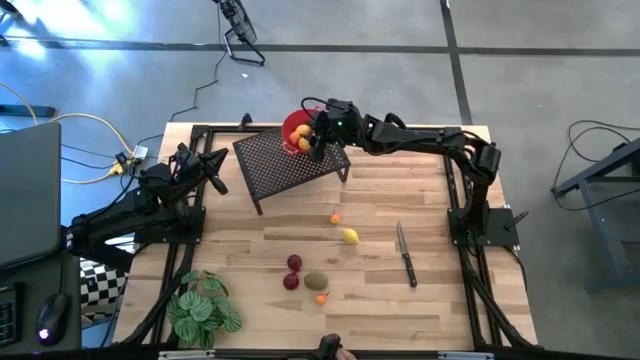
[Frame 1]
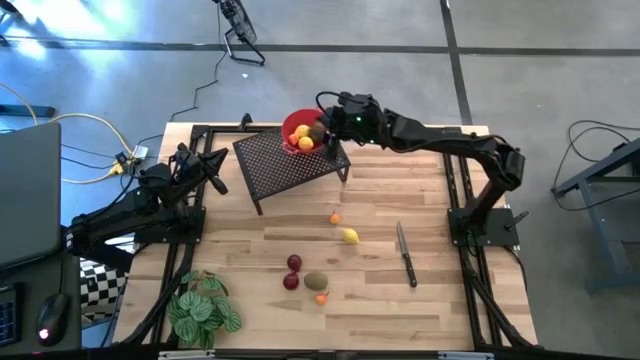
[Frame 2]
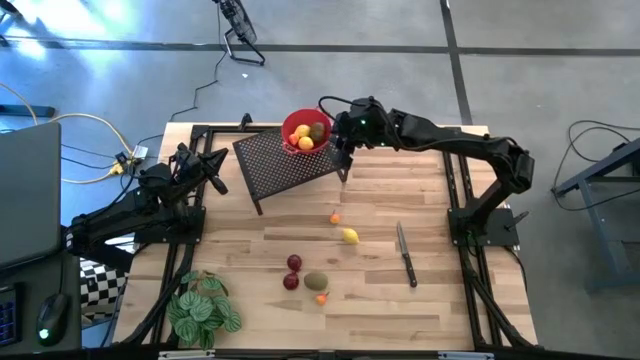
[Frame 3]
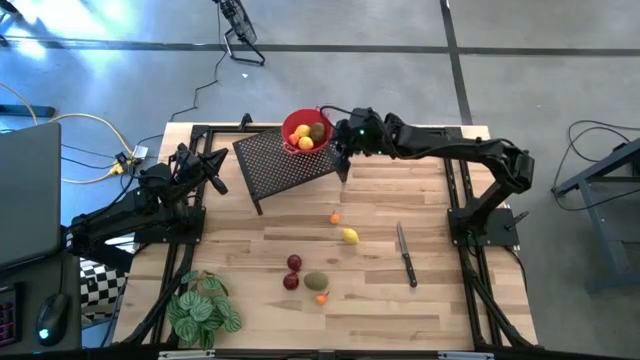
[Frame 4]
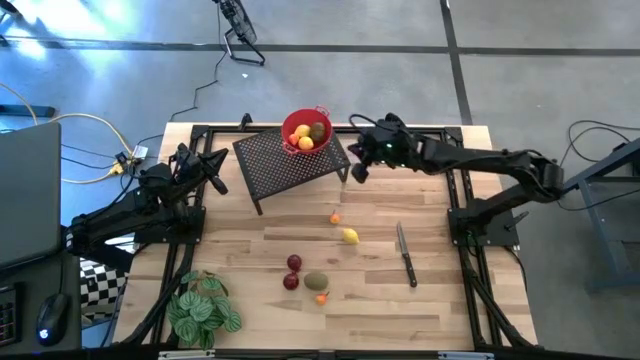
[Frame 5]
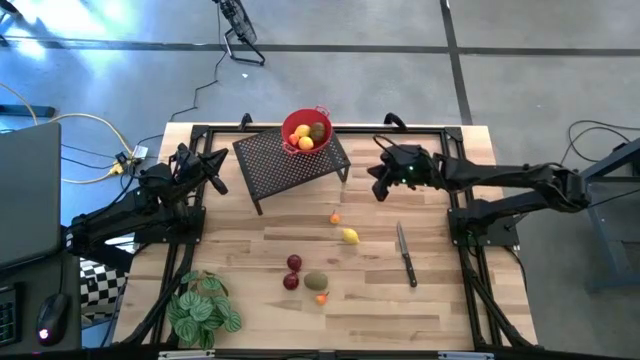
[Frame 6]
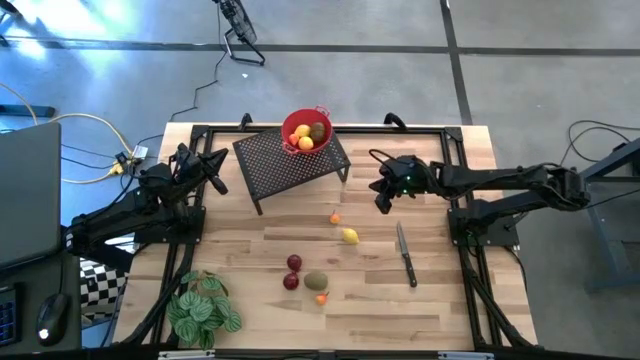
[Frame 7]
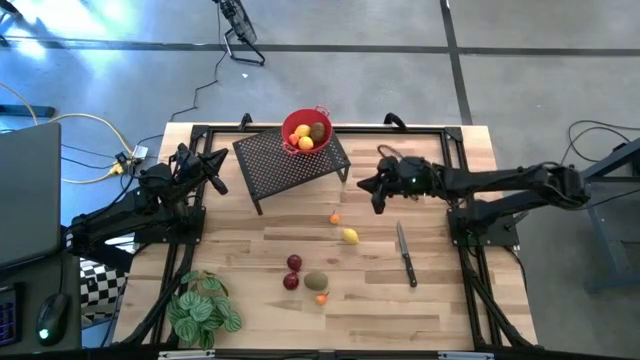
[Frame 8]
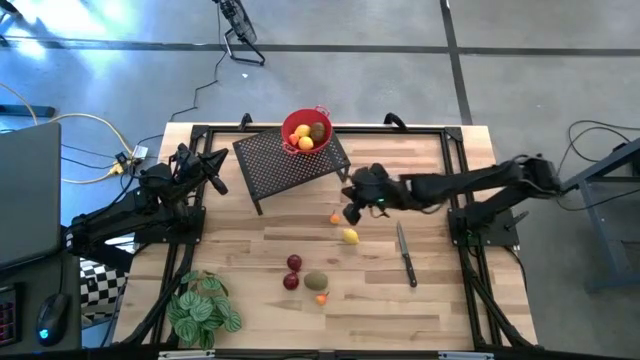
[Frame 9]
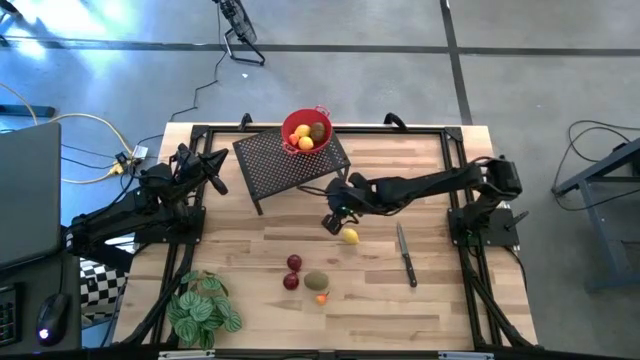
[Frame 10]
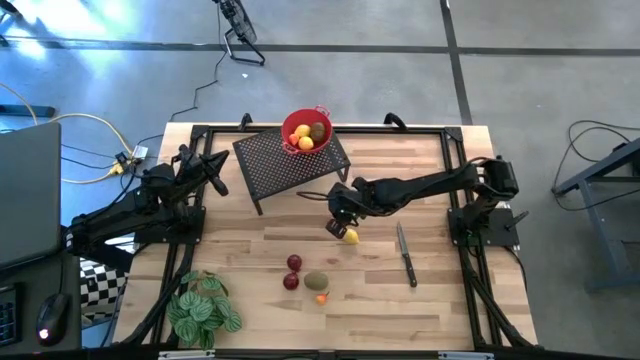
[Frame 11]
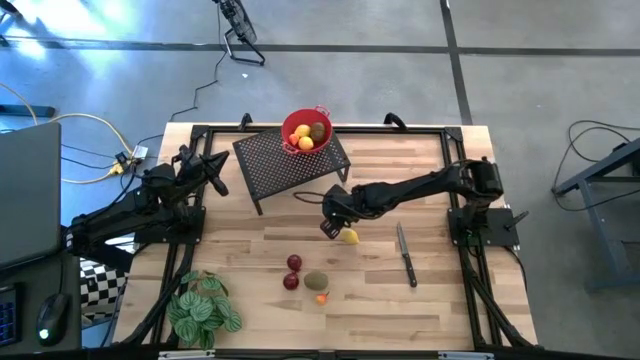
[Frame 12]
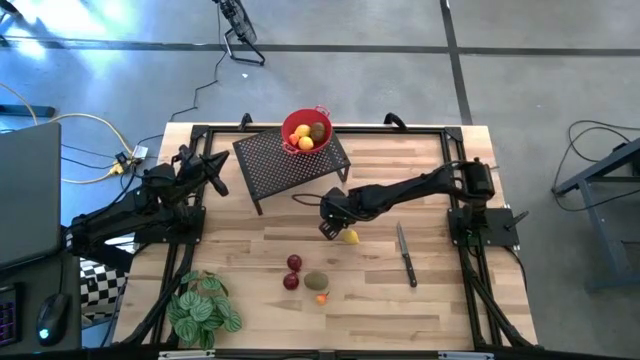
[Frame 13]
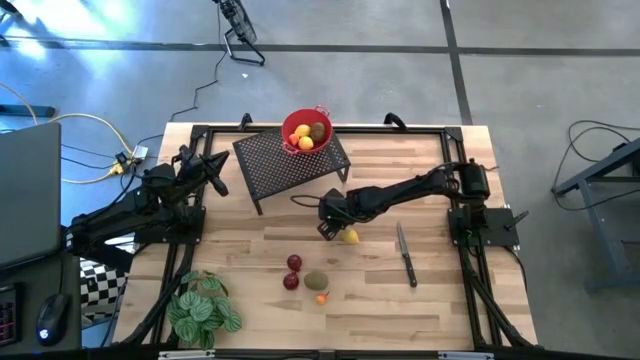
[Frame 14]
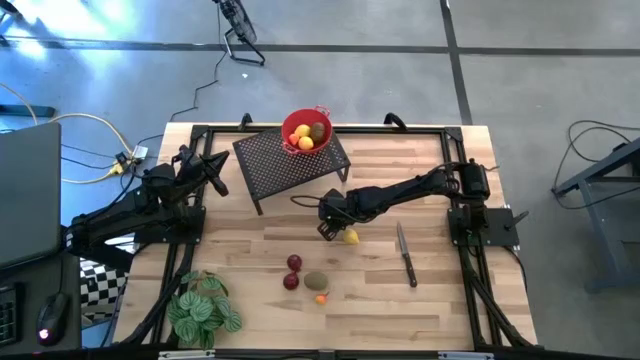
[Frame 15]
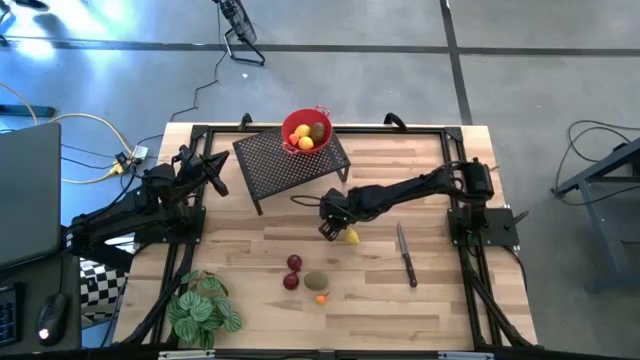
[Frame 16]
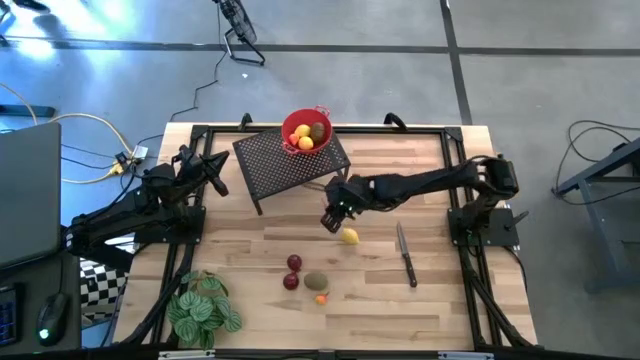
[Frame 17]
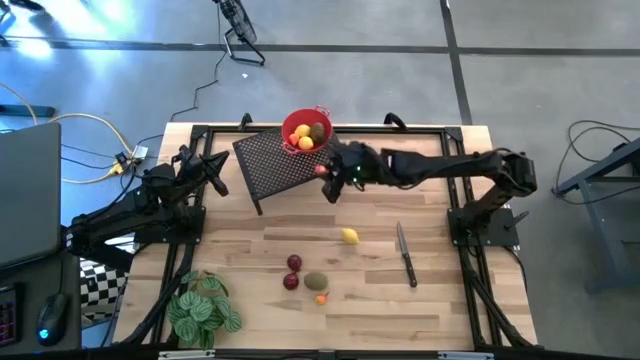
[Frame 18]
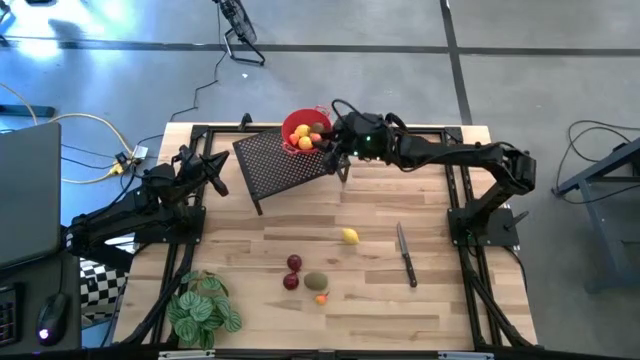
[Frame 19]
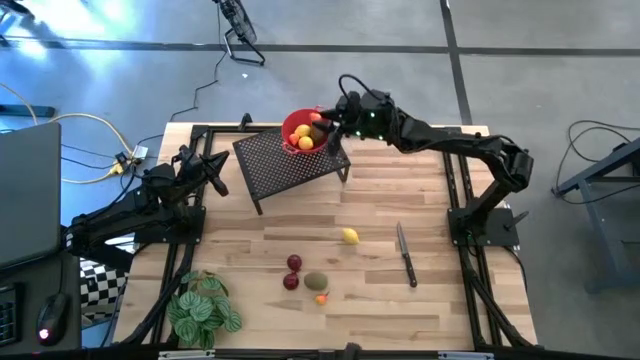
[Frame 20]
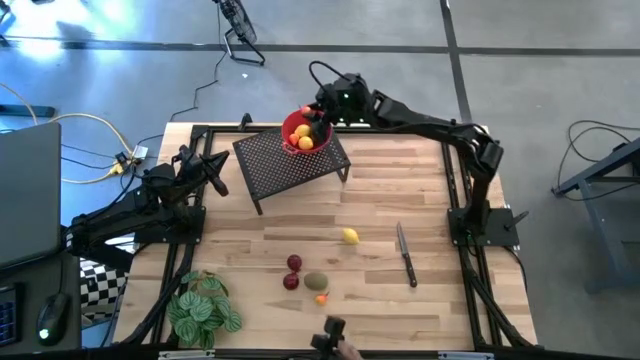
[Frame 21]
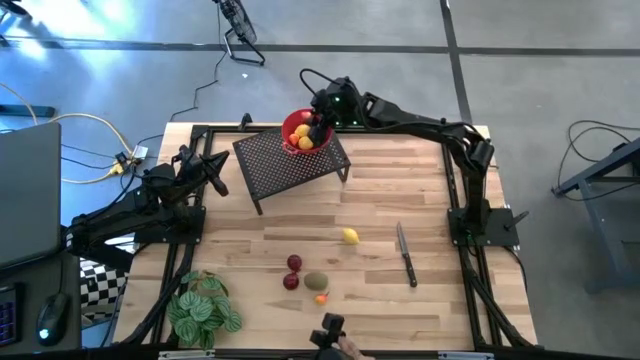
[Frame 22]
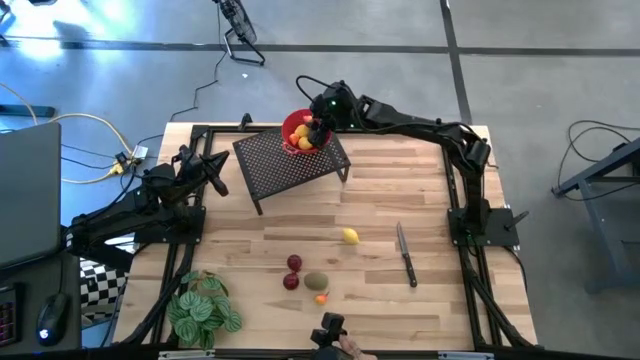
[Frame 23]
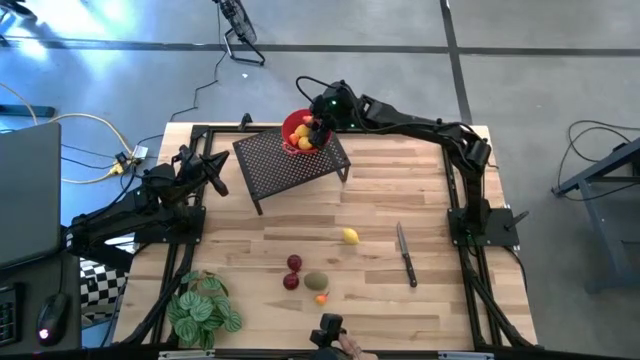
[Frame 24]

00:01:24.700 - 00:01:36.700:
Task: Pick & Place Fruit
Put the top pear into the red strainer bowl on the shelf

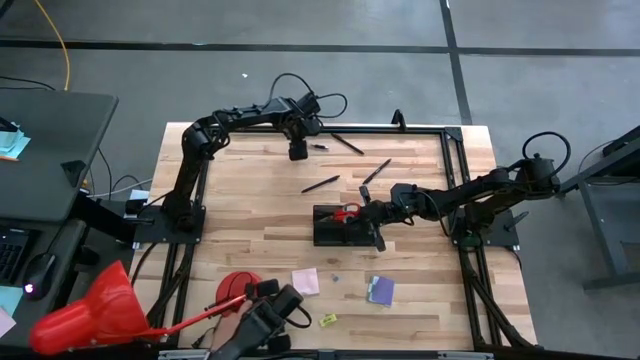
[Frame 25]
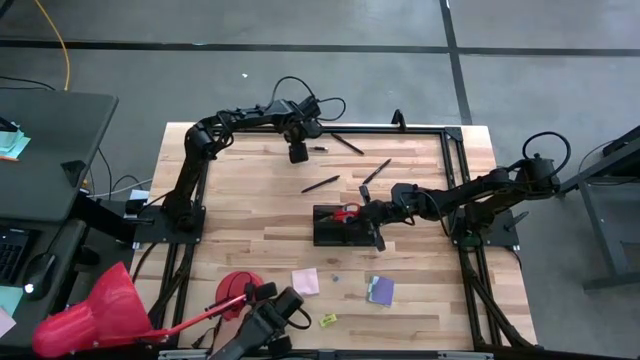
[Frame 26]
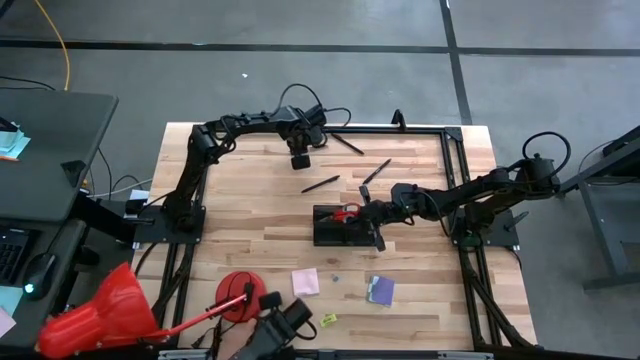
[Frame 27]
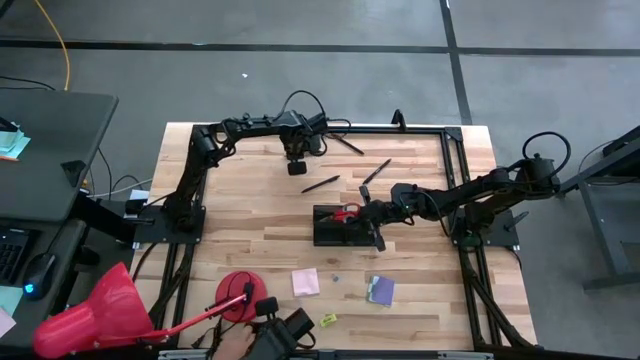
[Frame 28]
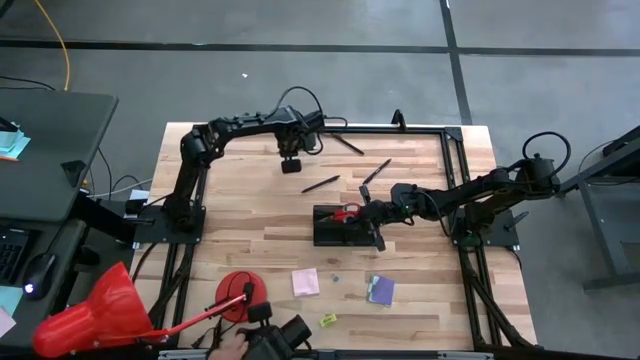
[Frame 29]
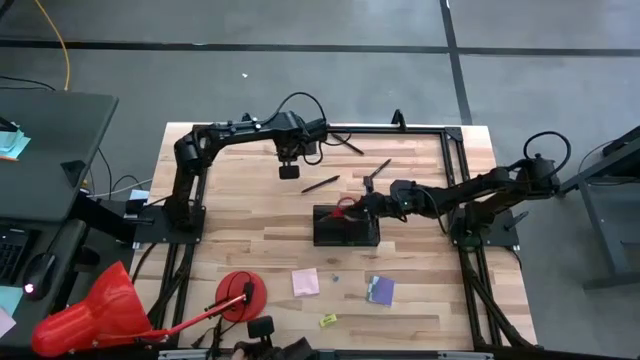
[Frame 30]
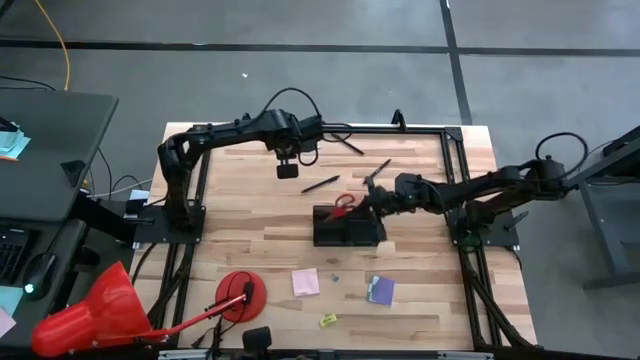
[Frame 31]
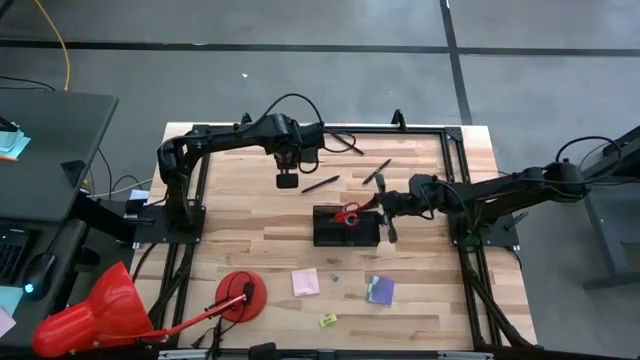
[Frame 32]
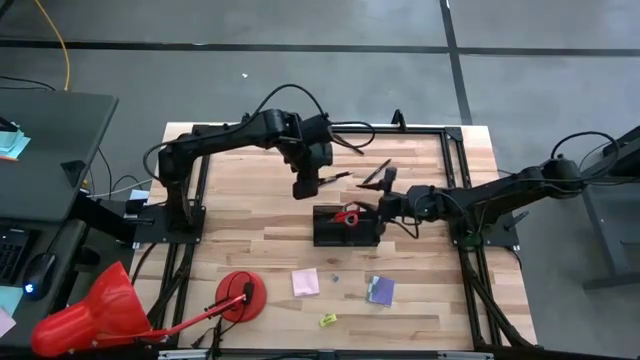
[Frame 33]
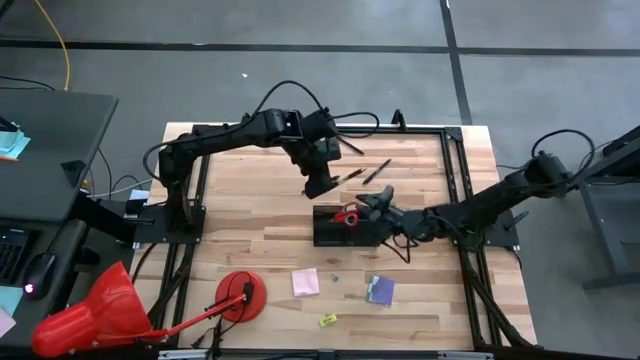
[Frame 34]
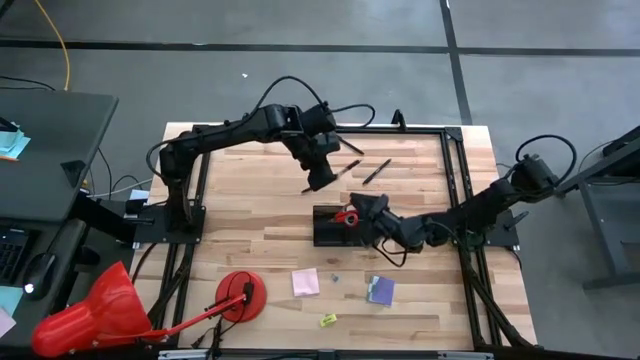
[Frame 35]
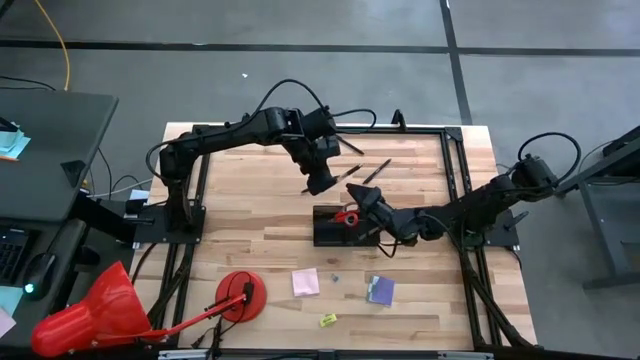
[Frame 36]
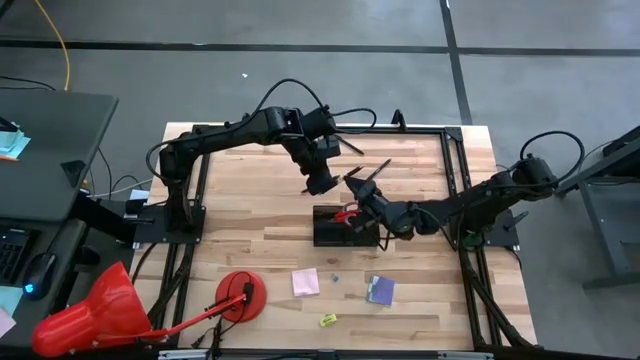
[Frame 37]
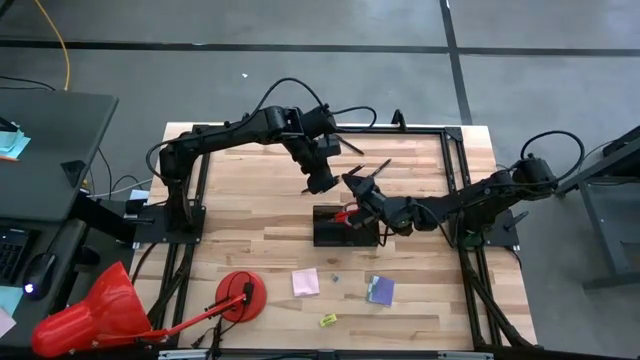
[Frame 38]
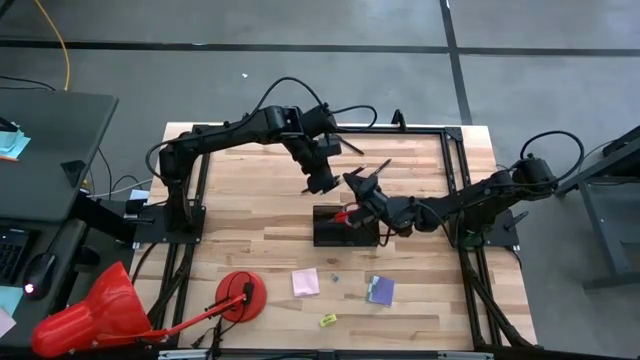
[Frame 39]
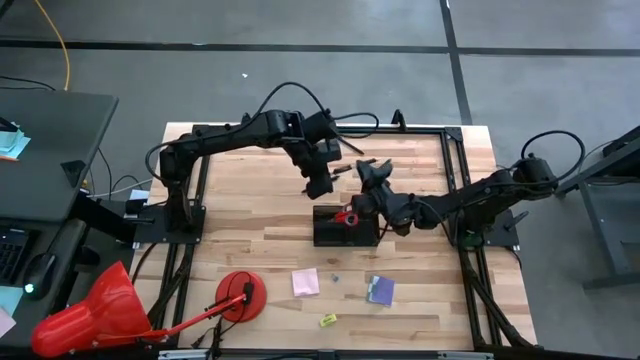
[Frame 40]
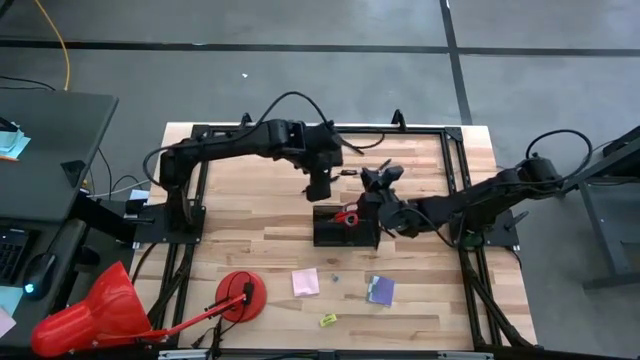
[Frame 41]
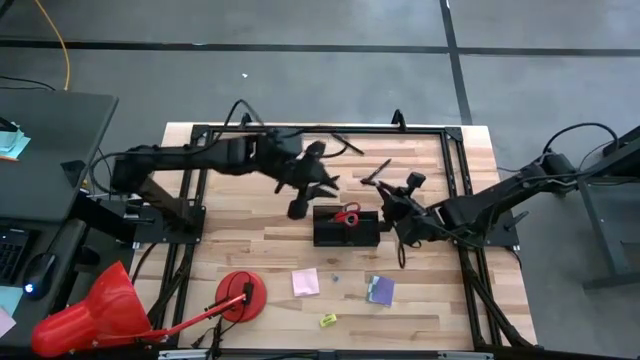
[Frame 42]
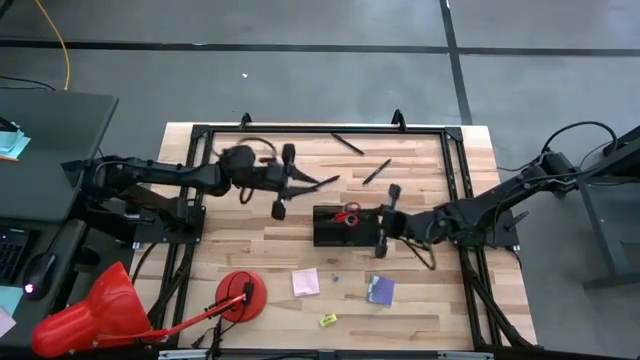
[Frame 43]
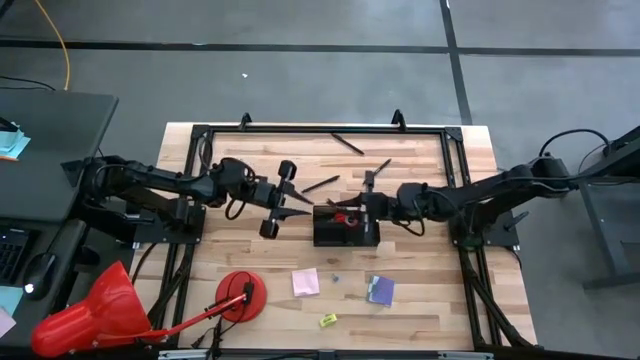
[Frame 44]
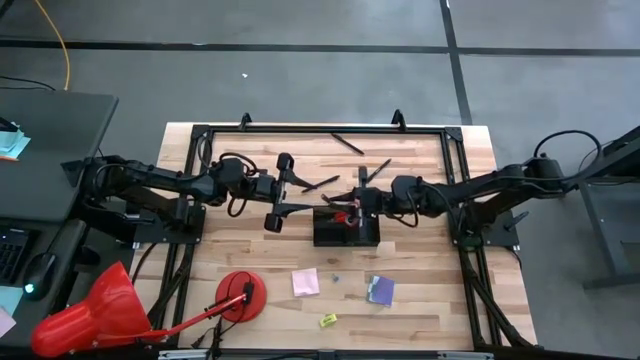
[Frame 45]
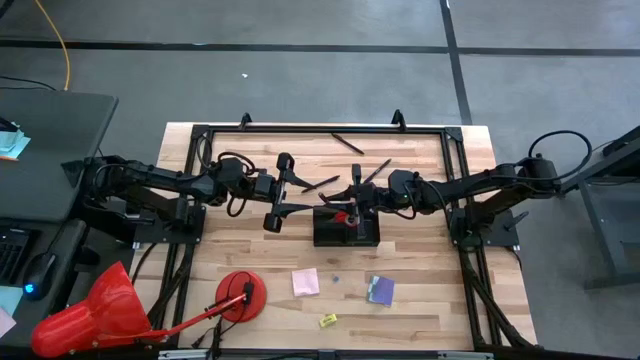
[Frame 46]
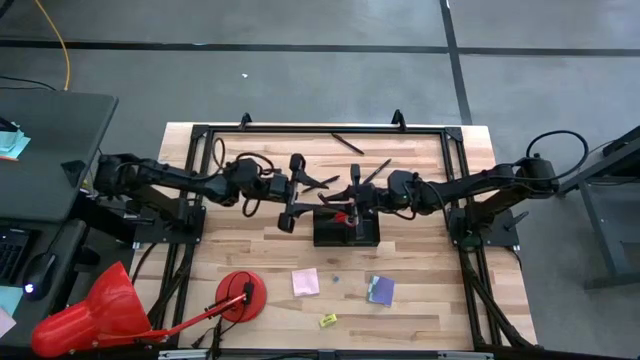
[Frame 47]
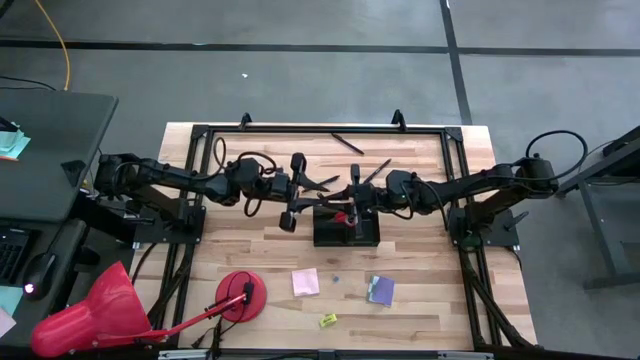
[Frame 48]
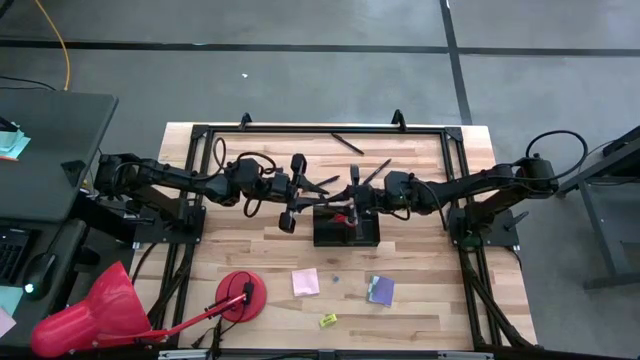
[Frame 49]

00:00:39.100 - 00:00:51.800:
Task: Pick and place office supplies into organizer
Put the black pen into the black desk organizer
